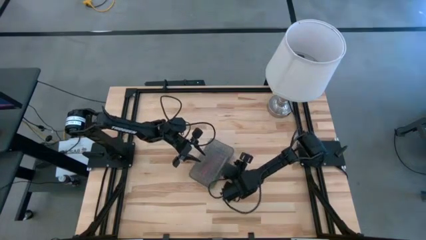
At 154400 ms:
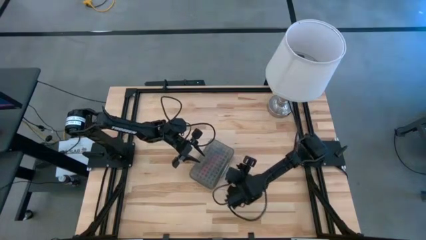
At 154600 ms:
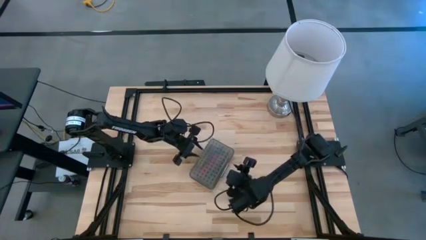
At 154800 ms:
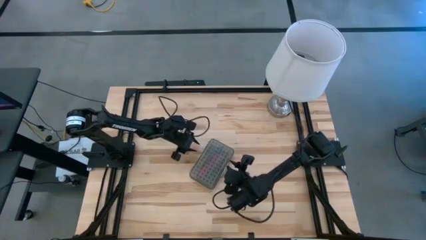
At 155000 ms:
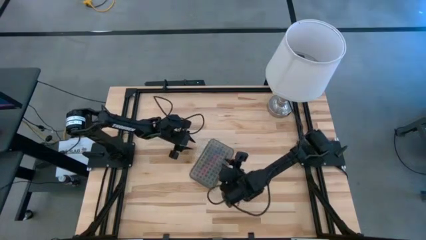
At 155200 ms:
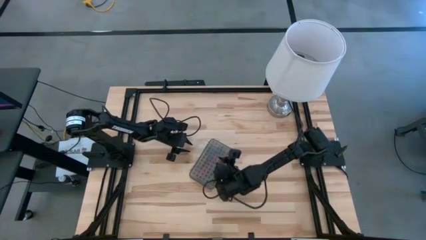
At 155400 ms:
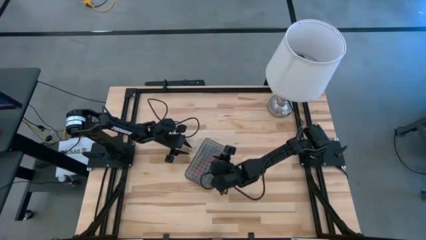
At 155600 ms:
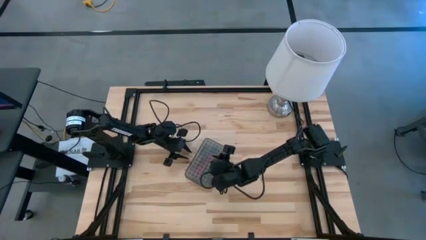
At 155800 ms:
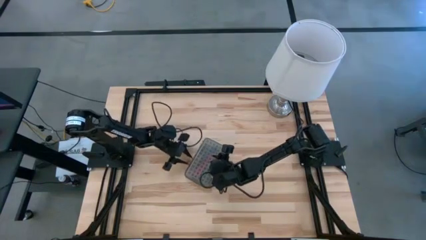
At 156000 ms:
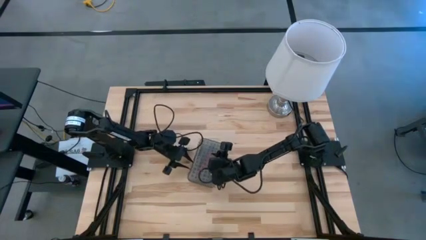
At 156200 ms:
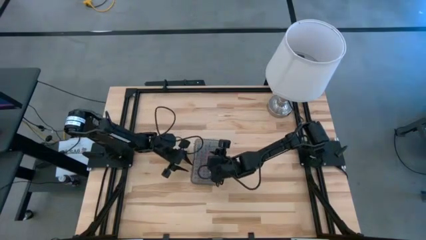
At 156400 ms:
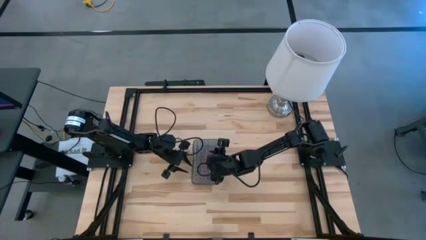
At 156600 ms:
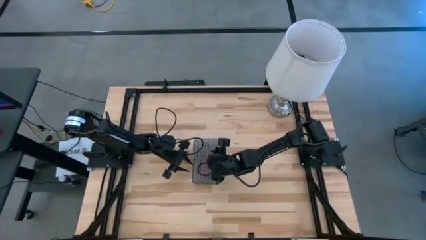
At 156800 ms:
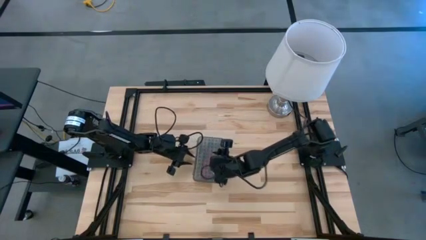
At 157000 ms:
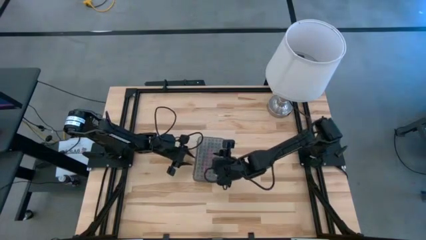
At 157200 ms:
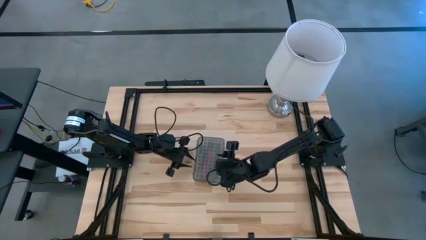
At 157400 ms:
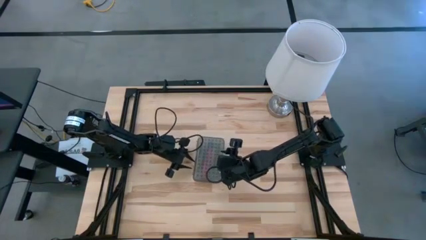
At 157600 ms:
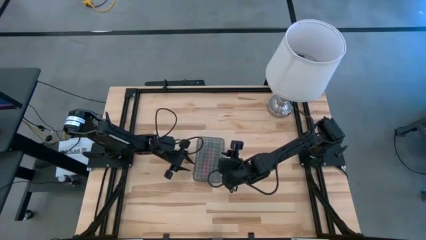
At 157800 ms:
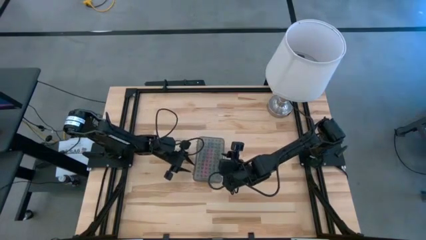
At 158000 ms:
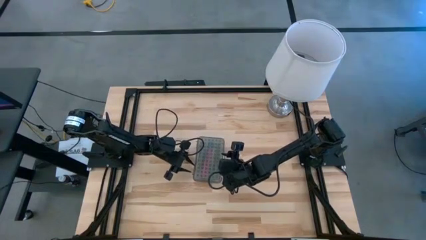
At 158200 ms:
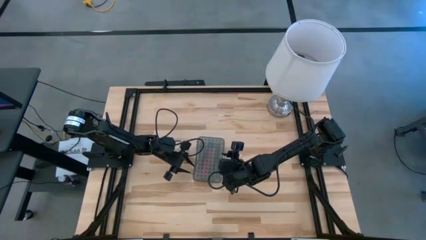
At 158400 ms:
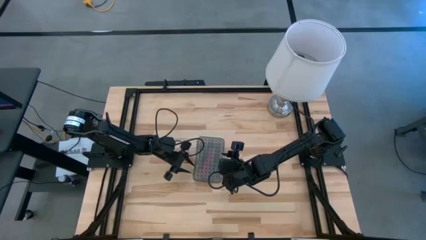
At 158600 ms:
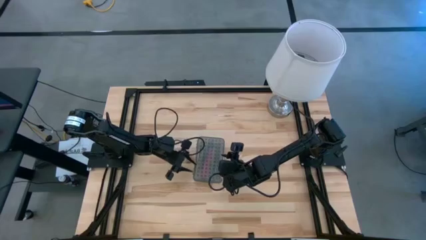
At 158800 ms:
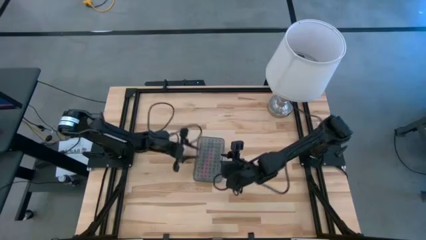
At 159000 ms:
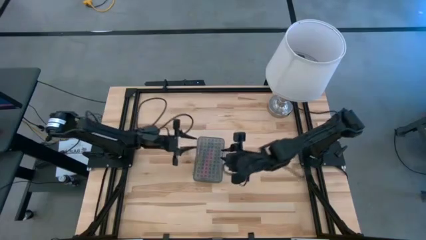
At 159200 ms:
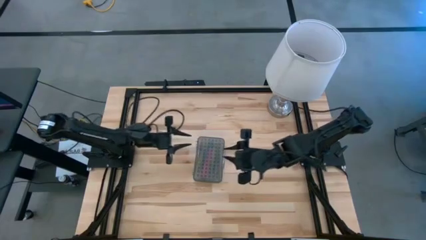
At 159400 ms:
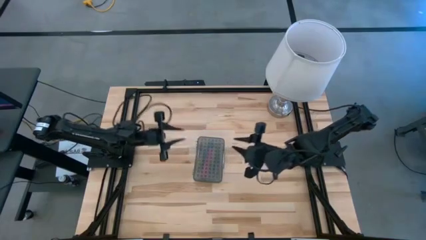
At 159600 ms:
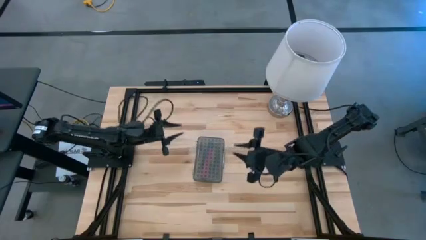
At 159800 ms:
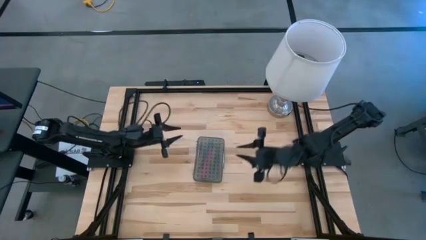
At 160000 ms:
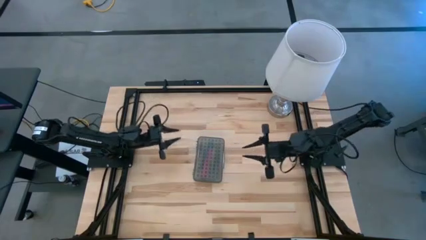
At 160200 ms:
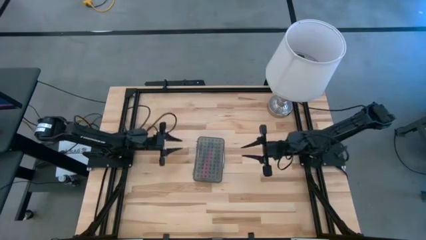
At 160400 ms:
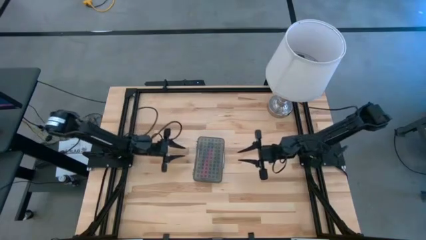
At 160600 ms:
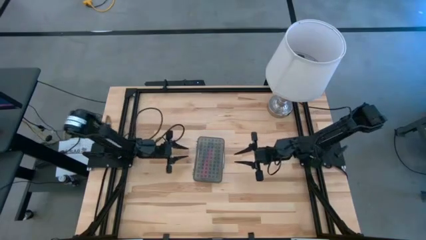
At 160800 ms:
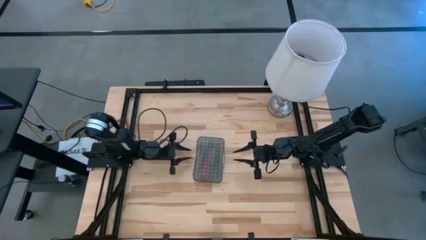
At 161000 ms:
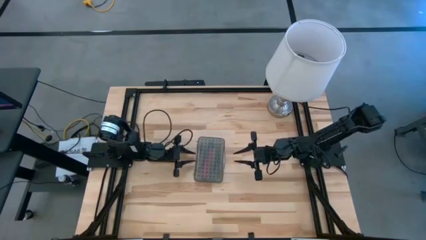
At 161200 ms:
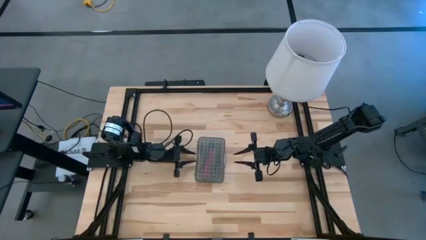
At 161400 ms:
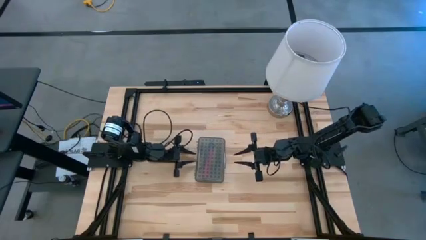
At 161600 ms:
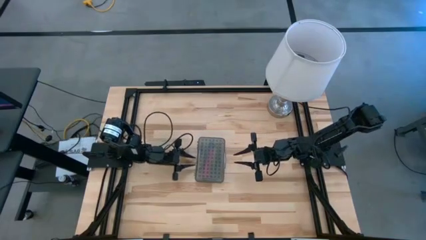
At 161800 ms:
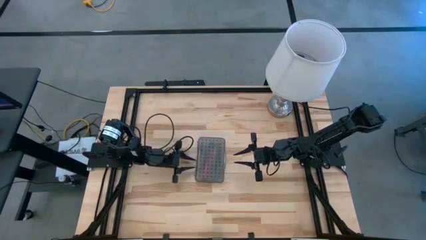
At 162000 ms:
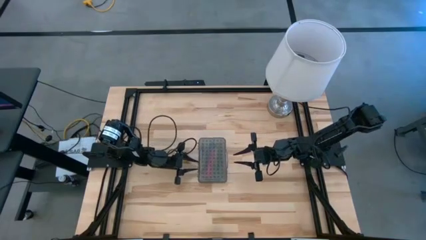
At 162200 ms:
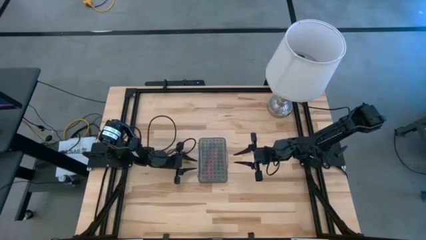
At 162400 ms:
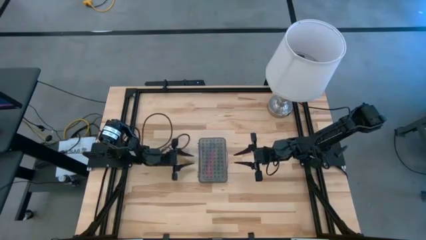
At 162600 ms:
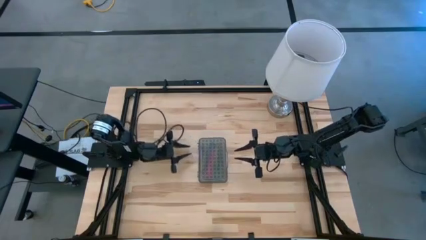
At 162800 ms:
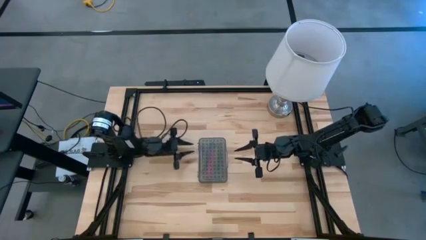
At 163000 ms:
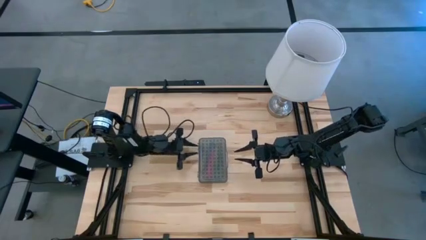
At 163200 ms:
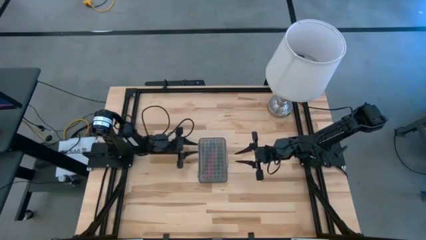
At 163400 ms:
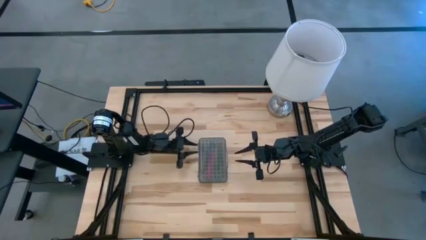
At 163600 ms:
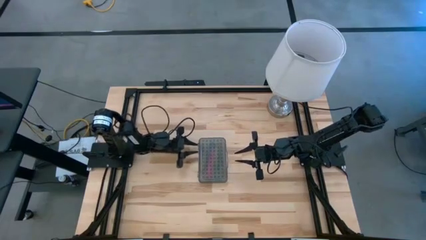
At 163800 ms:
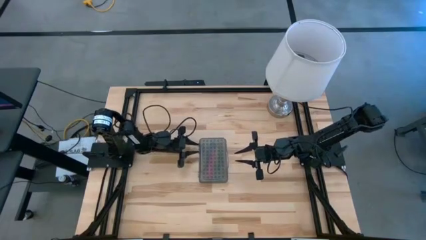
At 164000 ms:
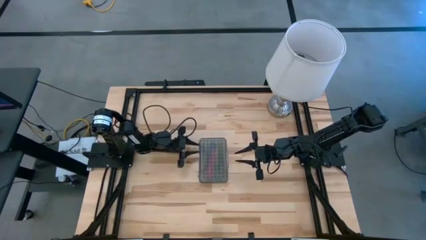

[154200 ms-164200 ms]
Task: Pick & place school supplies into a supply box
Adjust the transparent supply box
